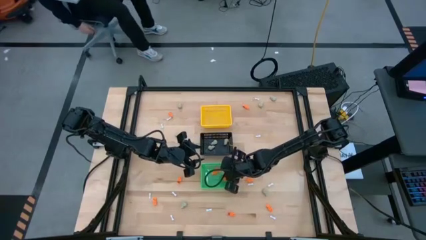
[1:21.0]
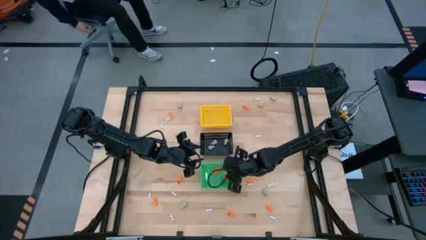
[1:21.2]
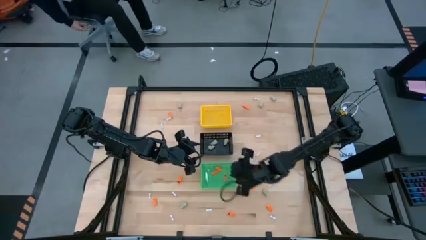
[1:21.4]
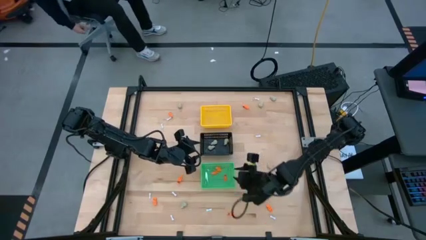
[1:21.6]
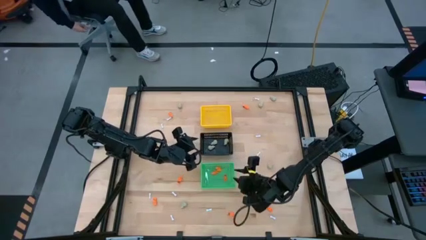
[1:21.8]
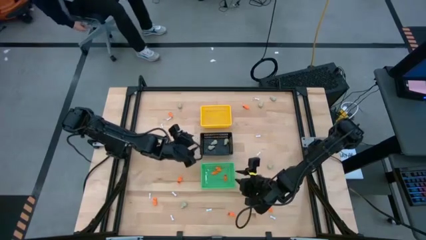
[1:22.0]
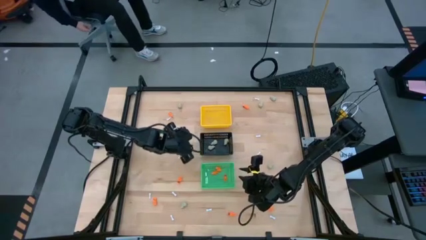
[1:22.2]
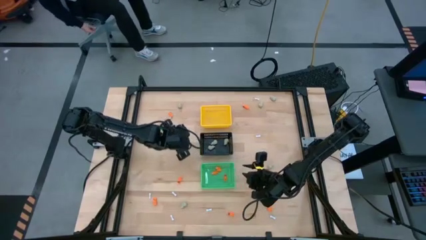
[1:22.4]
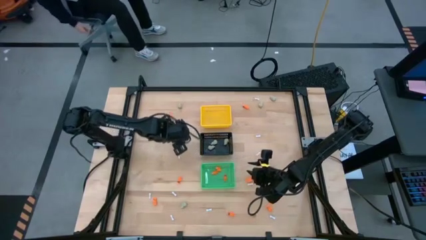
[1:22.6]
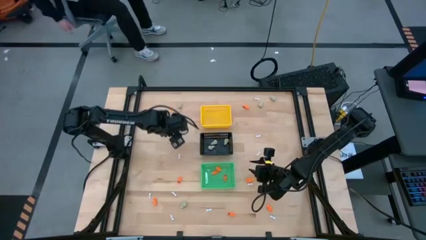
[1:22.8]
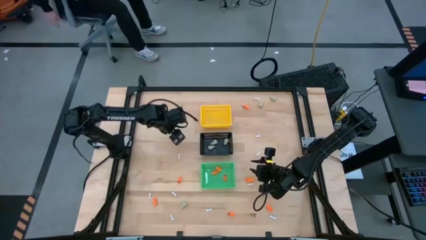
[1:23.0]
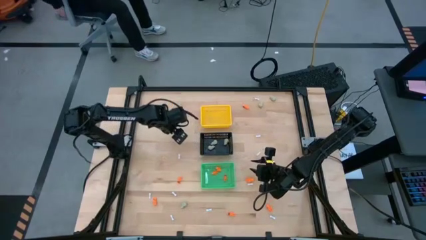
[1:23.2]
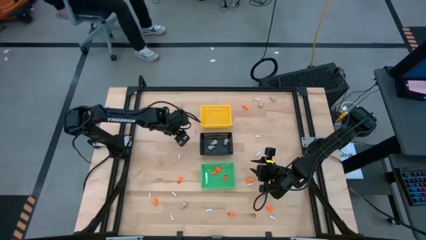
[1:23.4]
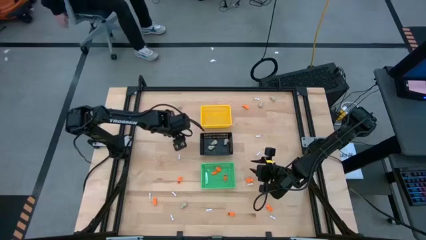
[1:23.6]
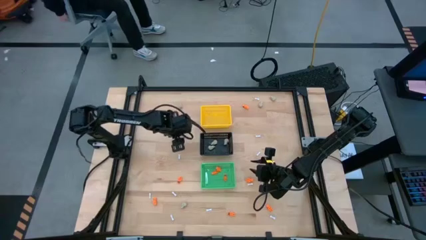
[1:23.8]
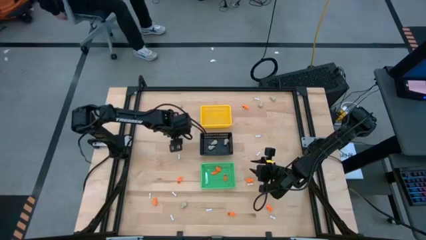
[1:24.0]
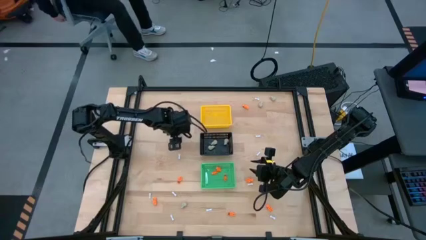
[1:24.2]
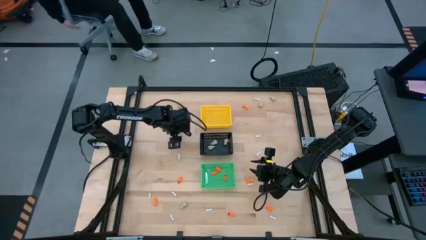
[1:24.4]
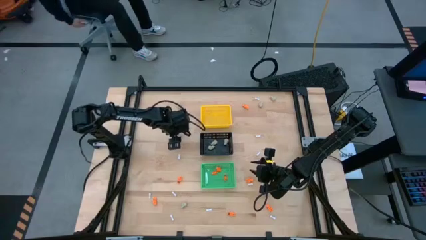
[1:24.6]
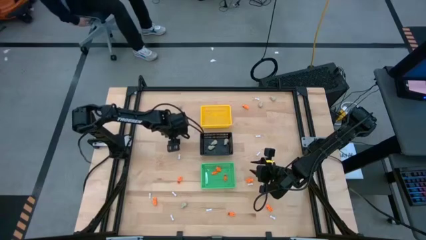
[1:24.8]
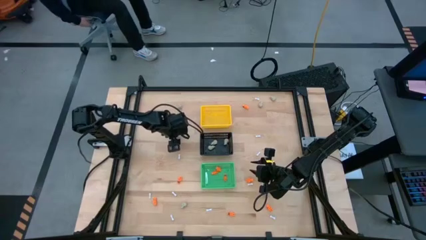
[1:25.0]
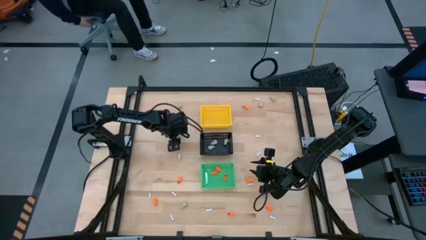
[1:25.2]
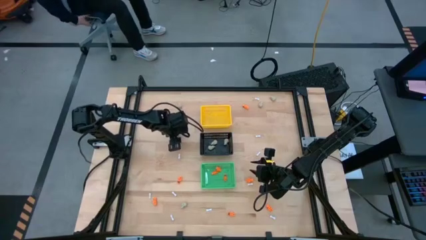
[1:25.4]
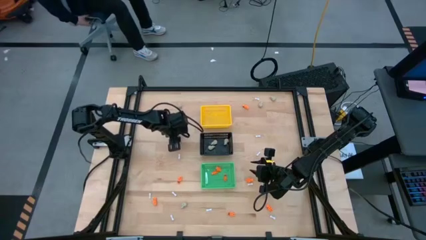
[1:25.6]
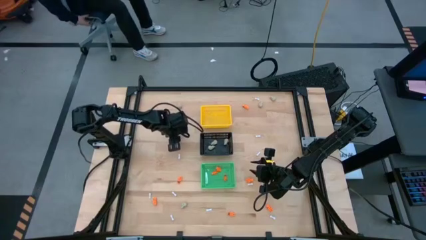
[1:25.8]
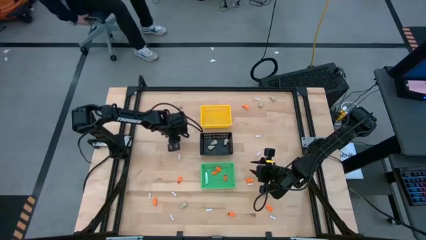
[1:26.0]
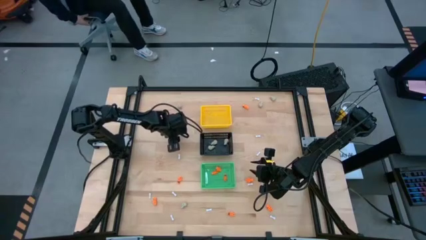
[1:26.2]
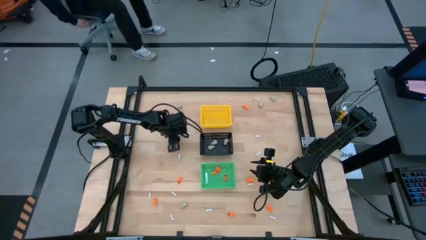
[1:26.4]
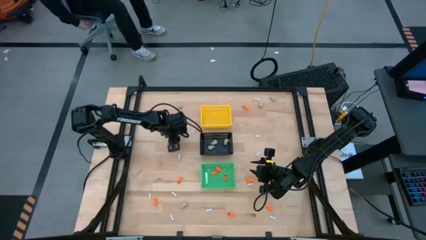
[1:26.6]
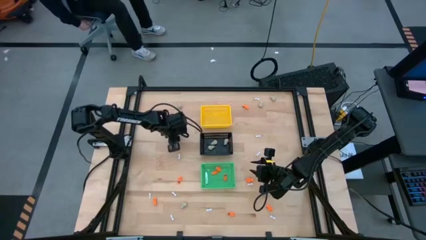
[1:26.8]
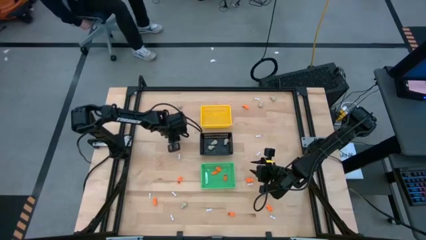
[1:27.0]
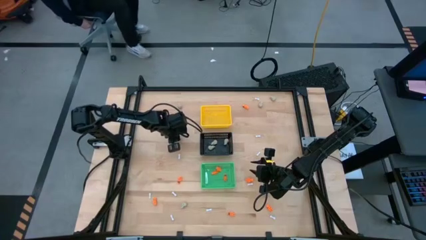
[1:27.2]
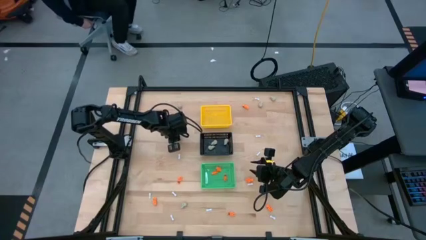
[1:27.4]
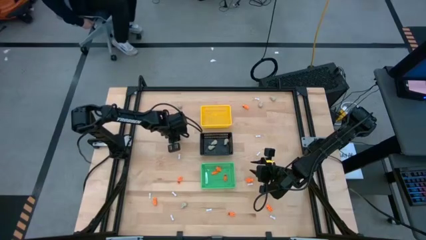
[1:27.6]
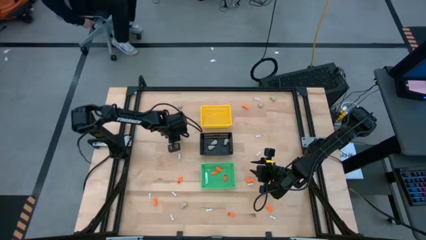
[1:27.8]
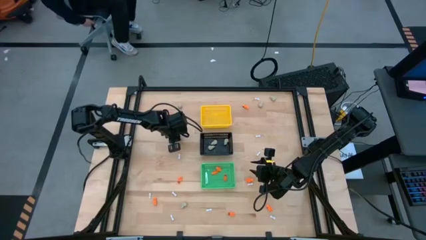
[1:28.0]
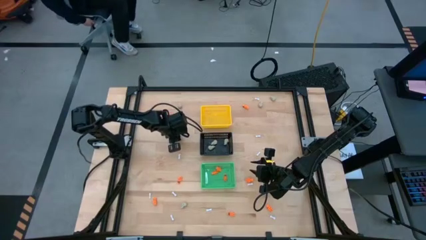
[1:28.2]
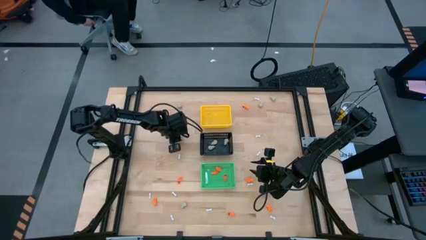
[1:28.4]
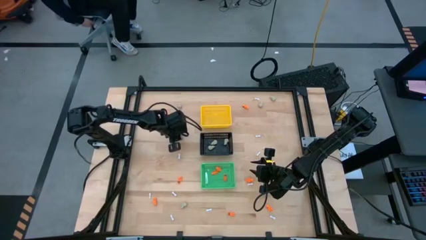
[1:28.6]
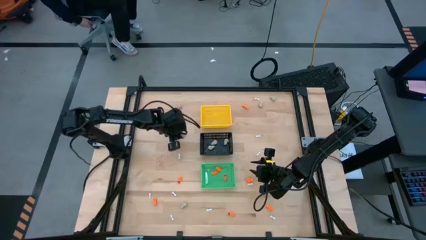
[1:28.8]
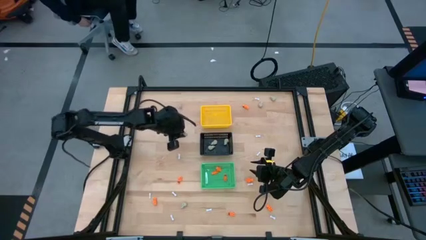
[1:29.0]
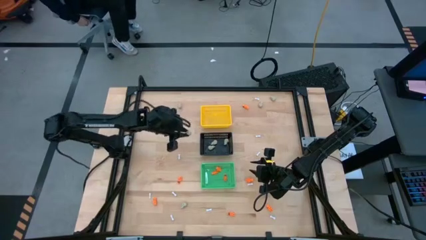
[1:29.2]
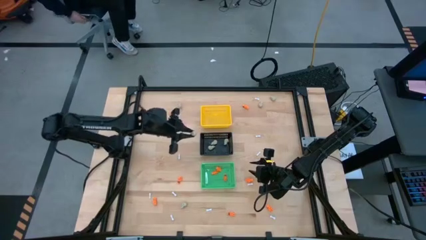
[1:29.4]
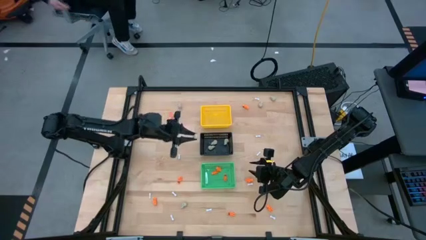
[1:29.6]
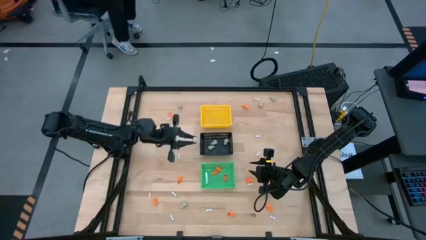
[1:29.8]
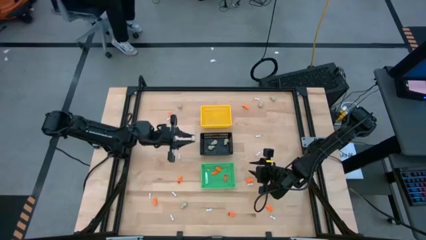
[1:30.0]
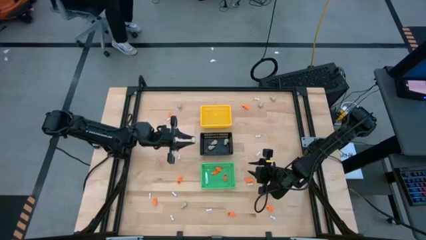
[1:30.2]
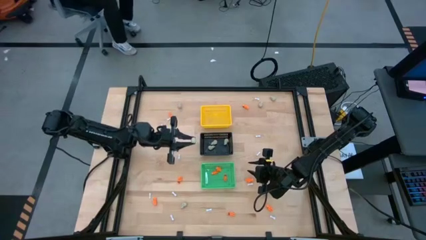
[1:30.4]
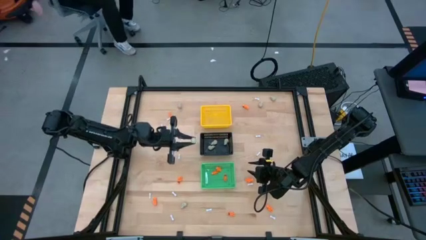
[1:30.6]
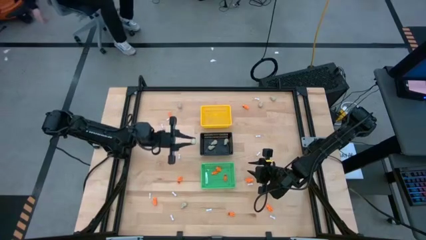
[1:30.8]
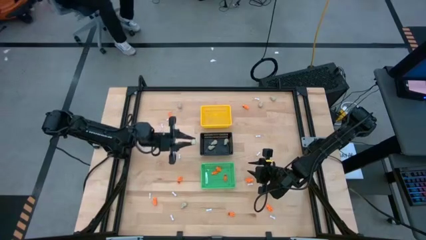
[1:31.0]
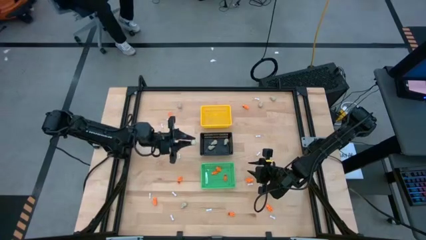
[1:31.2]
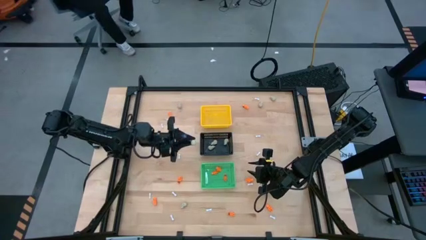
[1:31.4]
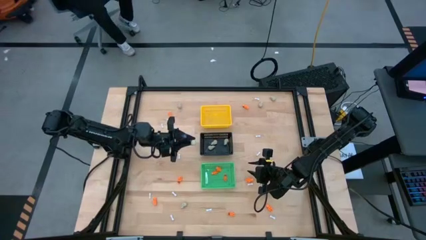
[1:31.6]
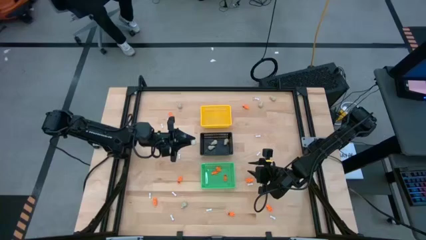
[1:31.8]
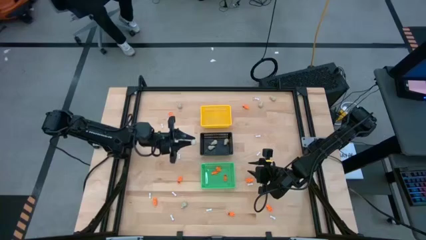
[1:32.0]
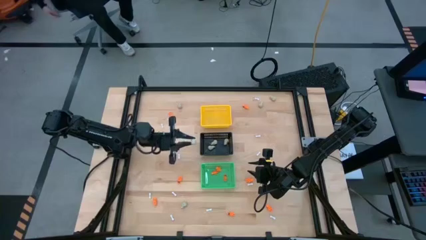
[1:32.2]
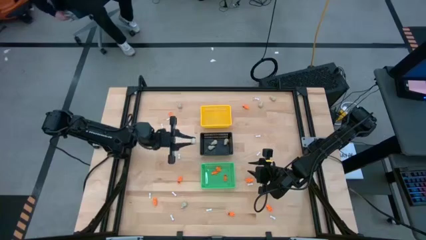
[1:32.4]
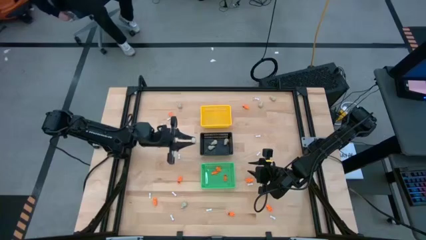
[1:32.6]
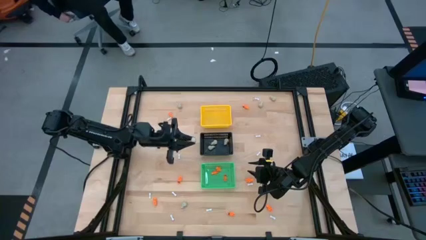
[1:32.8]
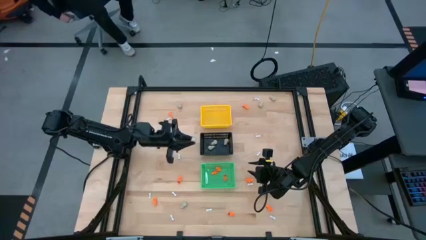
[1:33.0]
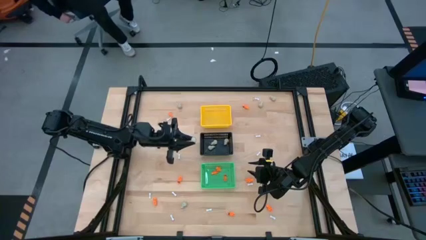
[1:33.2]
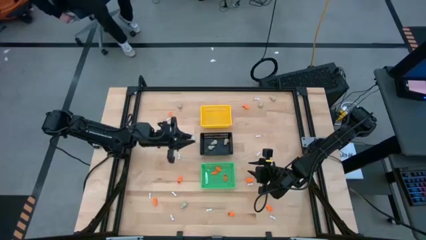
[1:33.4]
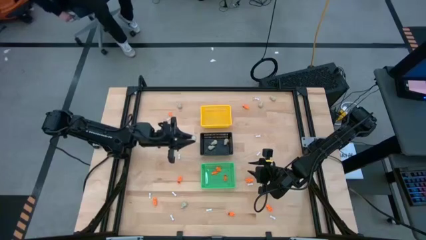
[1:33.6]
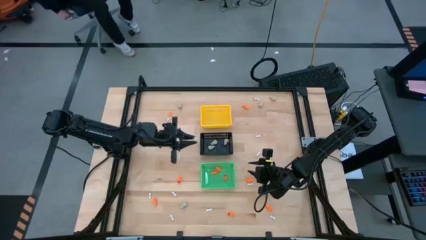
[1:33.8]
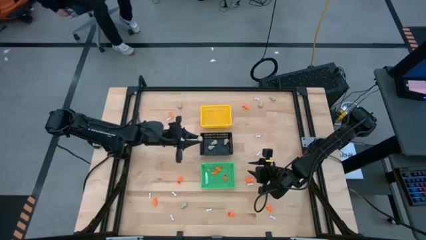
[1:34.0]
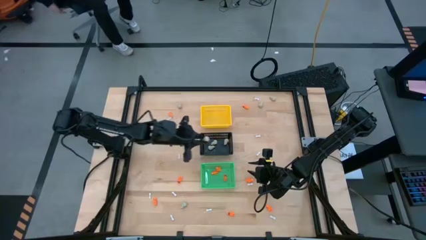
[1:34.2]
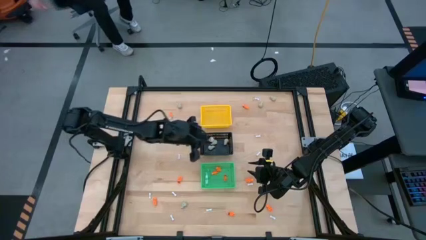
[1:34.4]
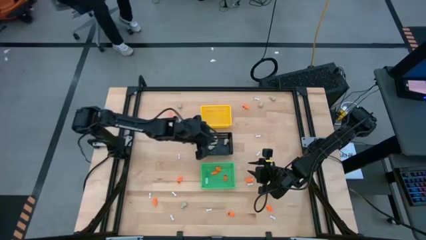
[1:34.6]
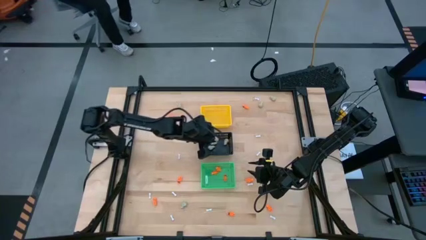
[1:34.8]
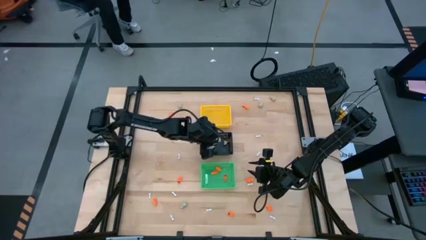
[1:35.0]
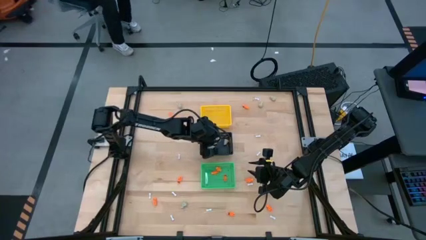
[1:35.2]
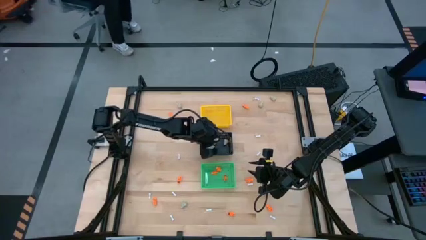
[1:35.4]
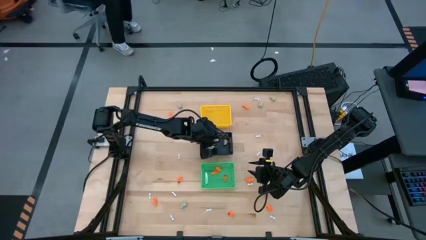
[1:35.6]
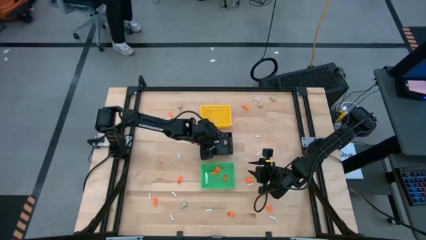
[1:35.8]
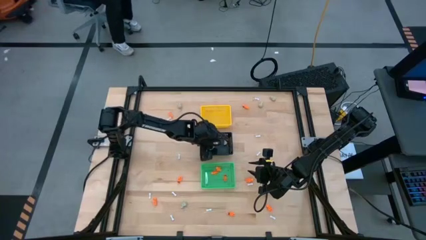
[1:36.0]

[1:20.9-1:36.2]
Task: Sort Halloween decoration
Put the gray skull toy into the black basket
